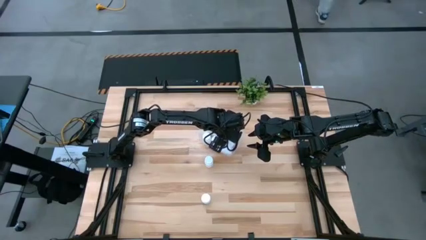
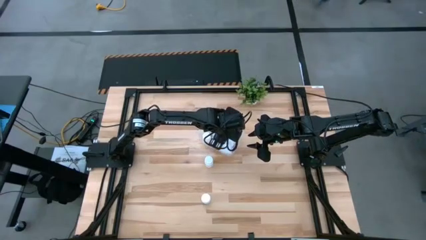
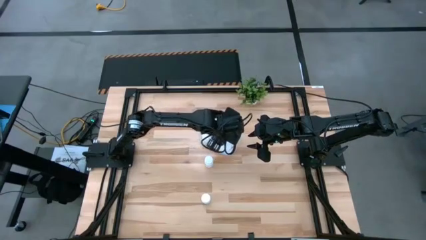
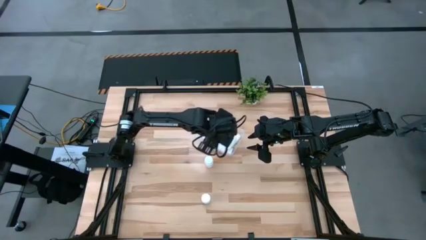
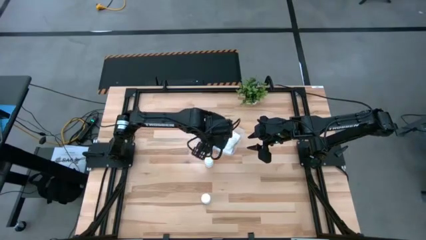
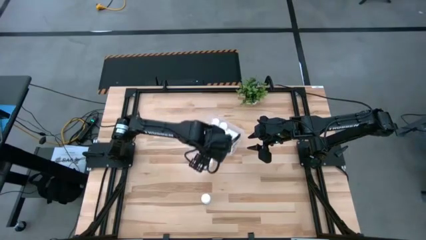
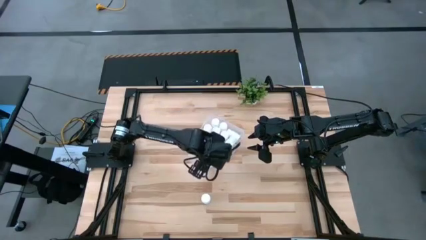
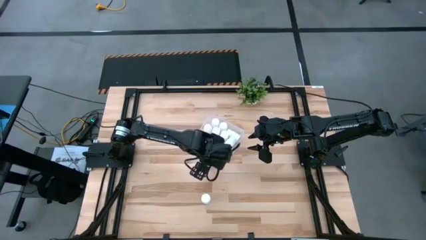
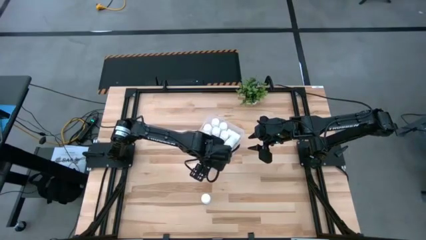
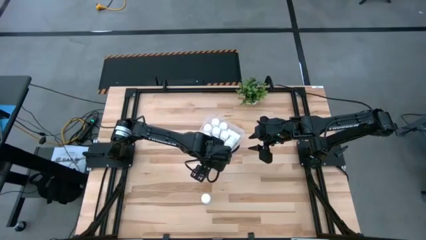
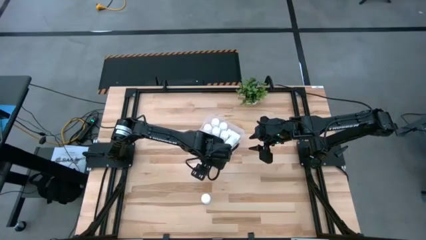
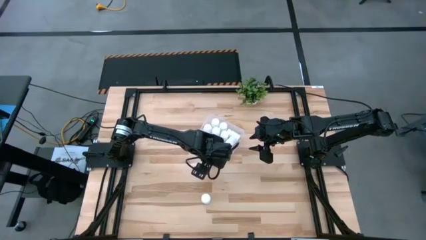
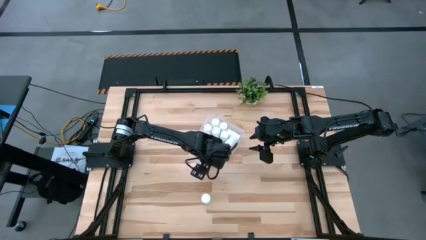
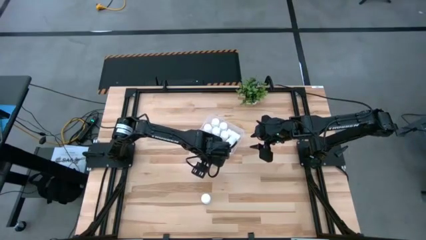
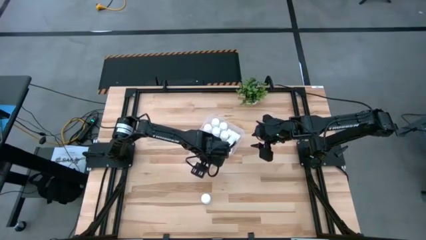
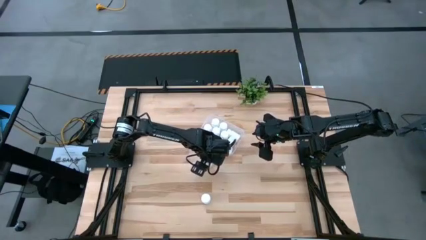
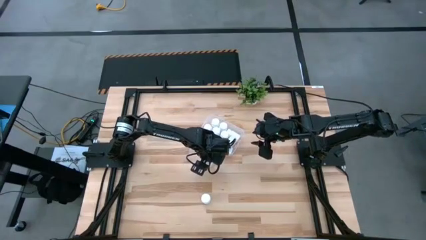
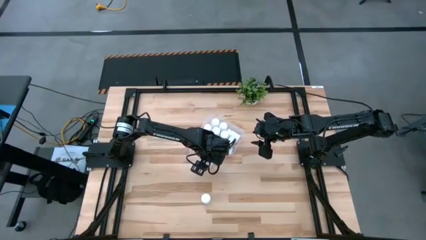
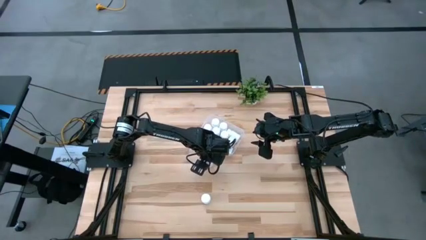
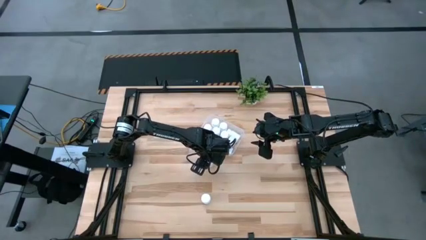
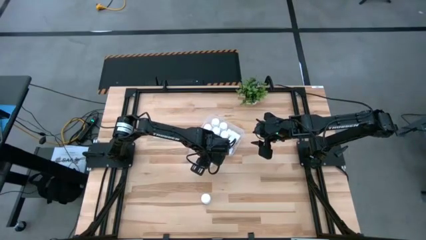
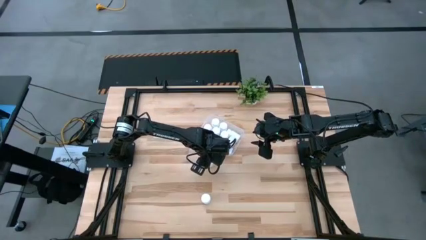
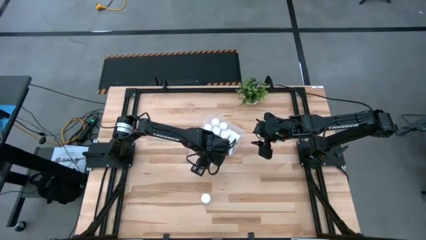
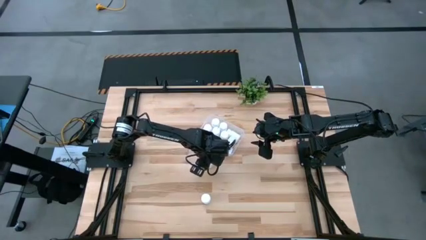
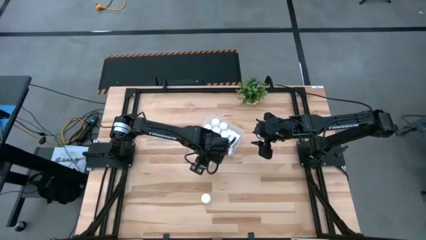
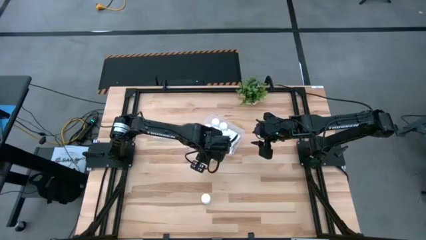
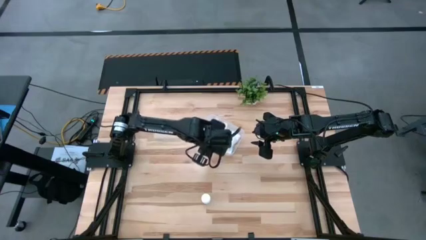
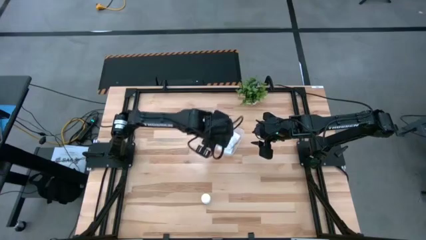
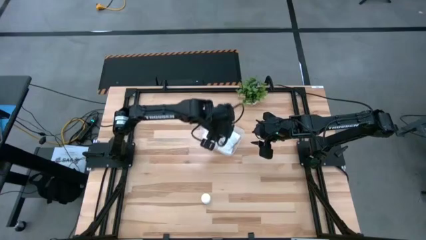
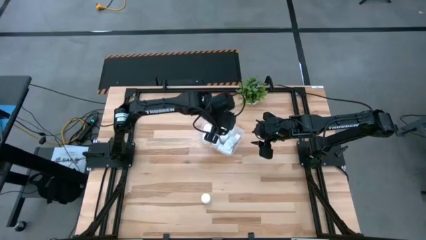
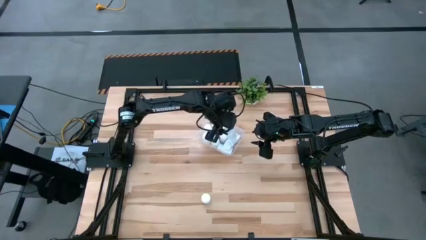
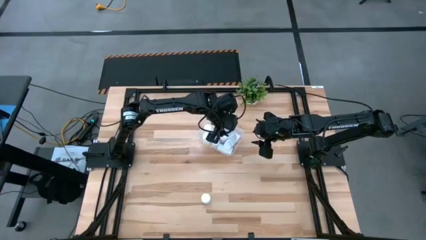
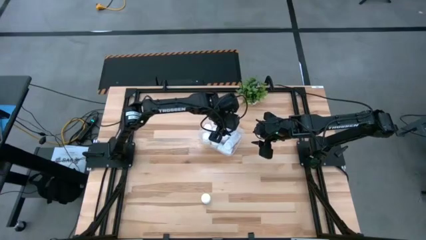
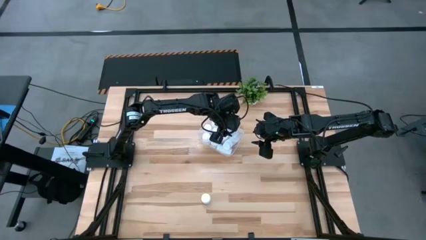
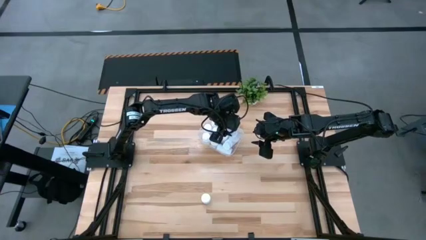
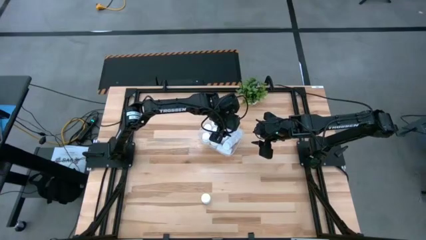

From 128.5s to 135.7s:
Task: Pick and place pill bottles into a basket
Put the top white pill bottle into the bin

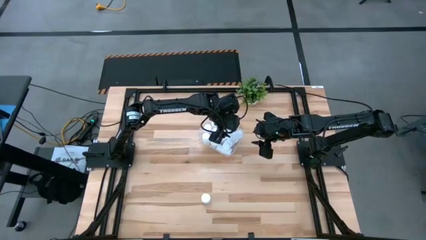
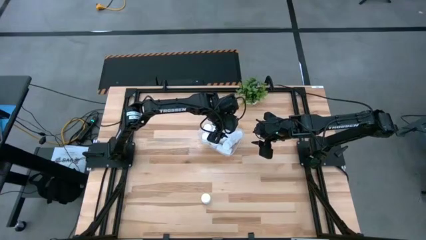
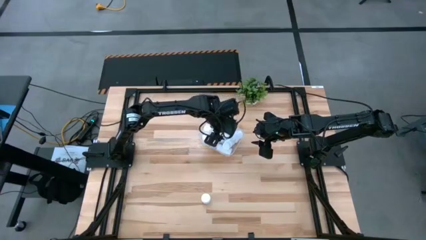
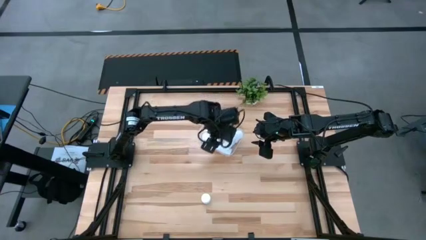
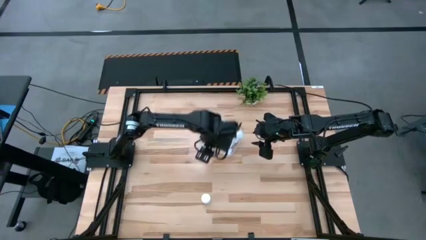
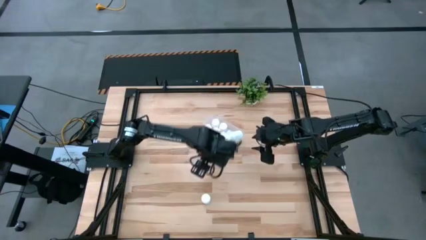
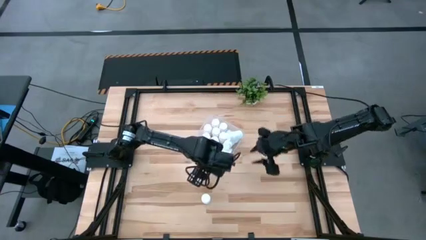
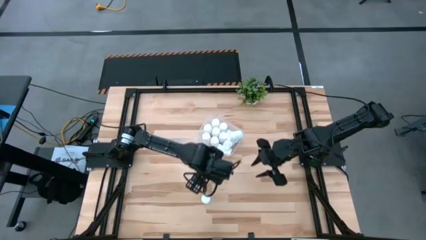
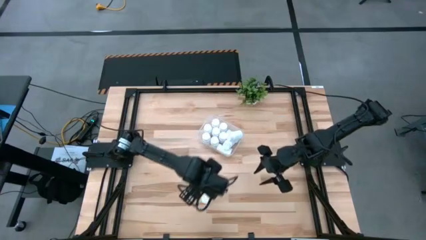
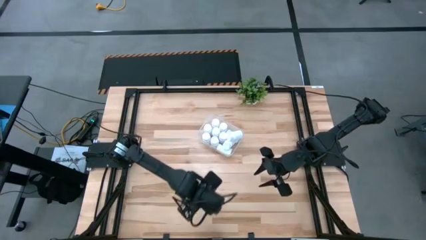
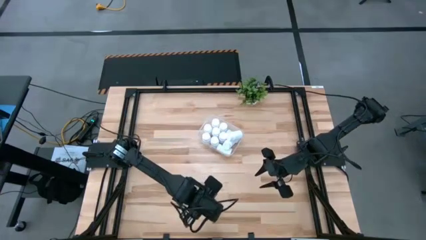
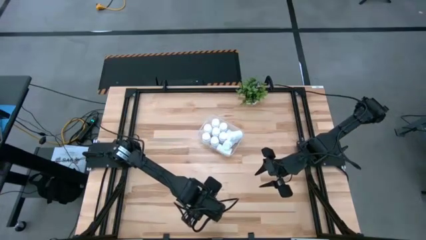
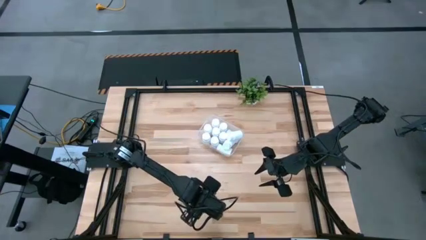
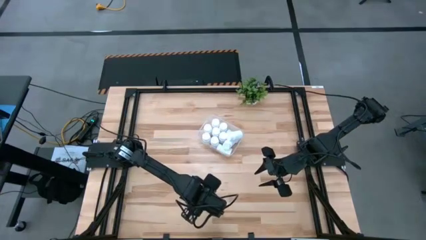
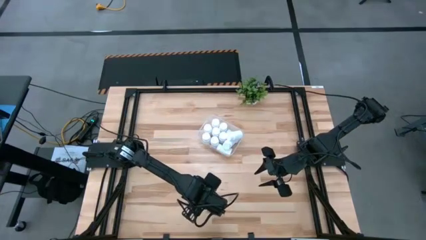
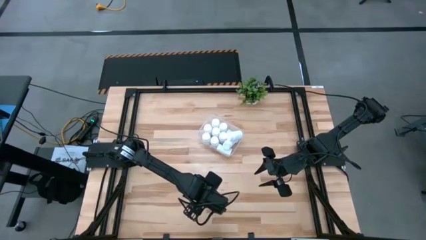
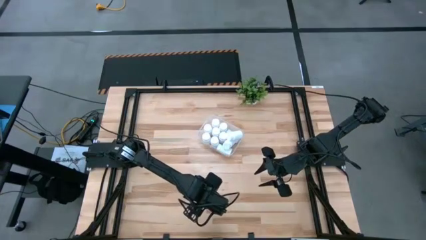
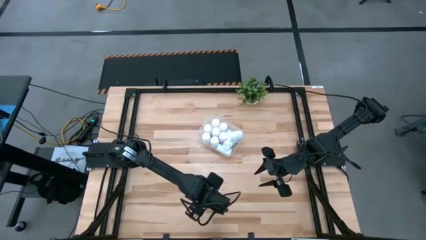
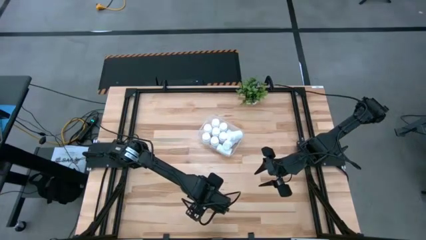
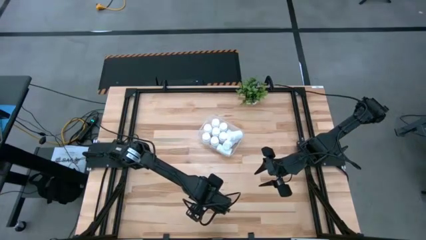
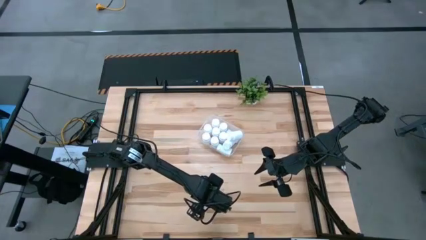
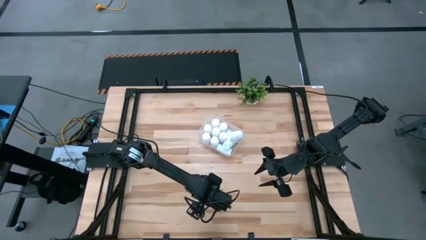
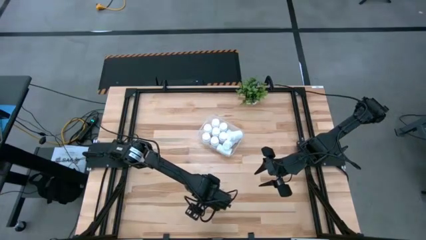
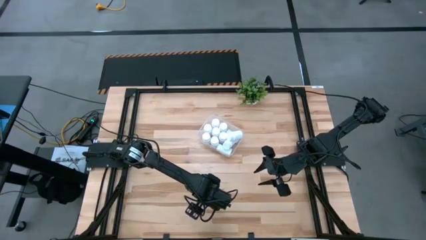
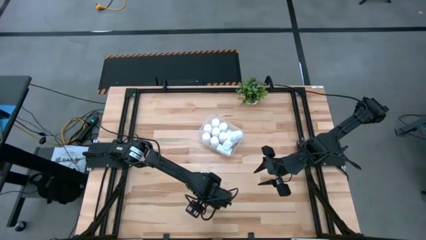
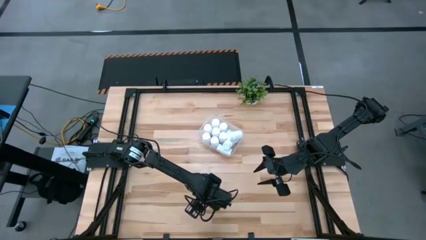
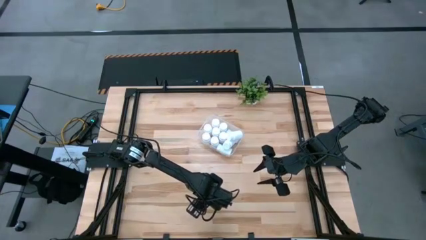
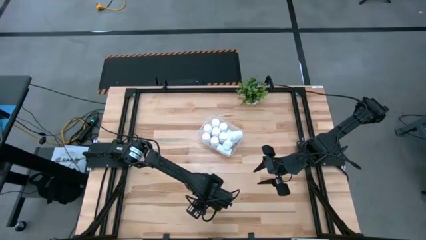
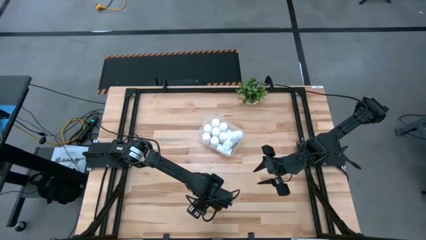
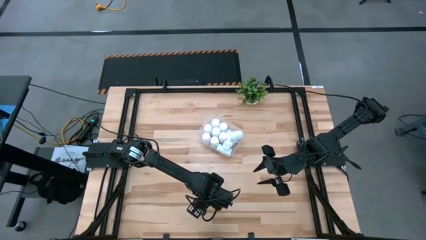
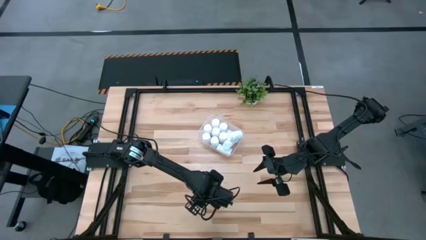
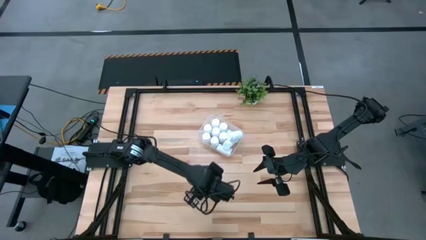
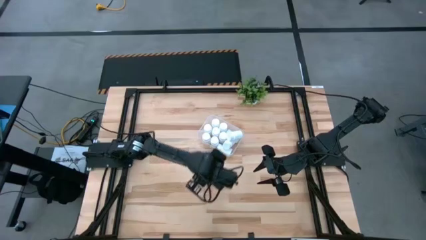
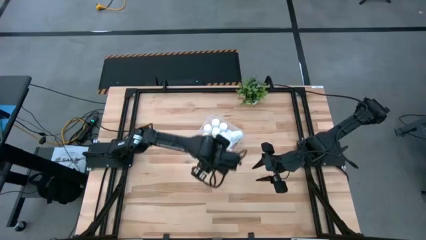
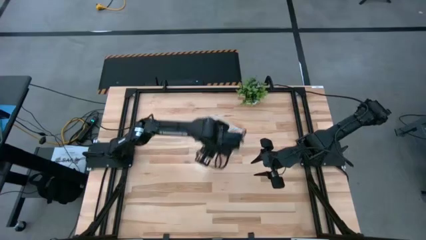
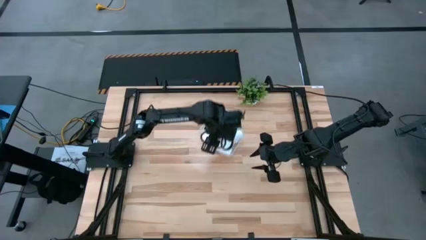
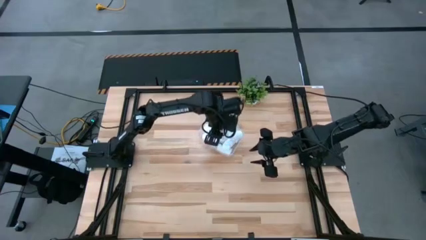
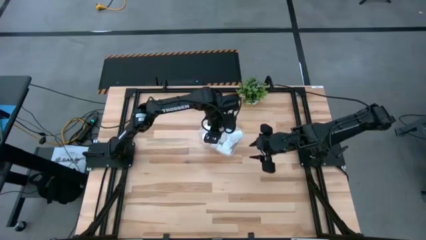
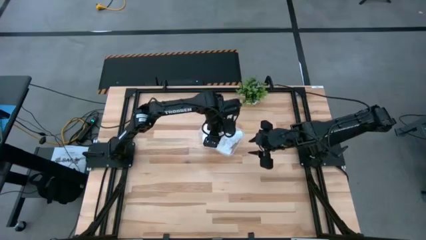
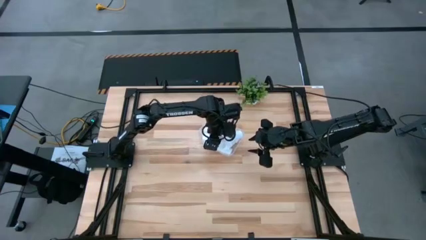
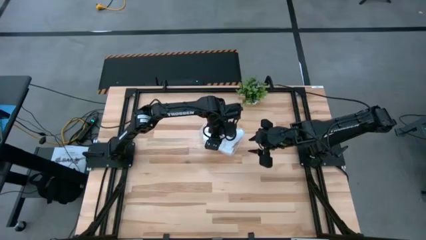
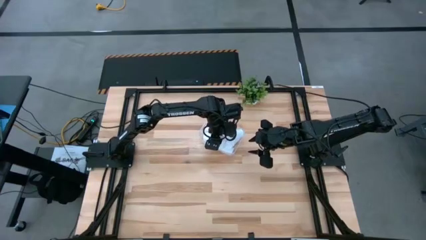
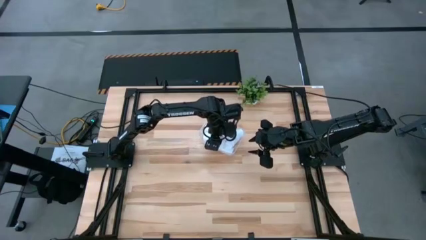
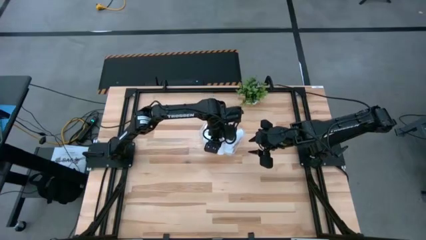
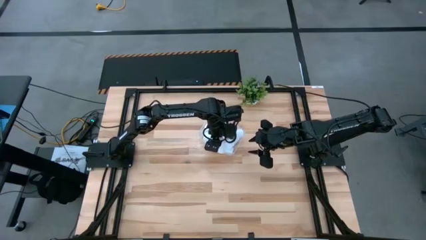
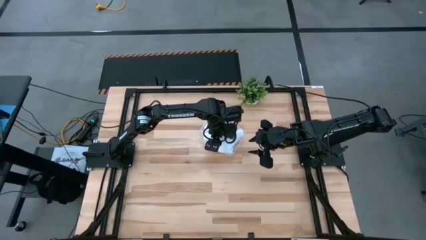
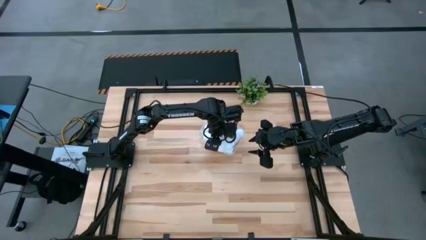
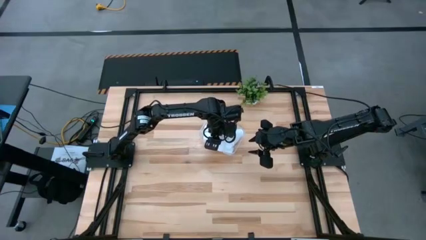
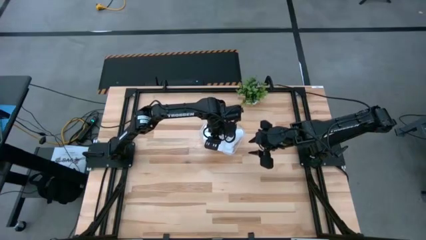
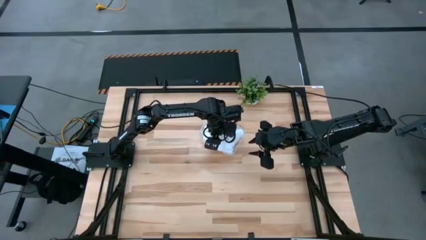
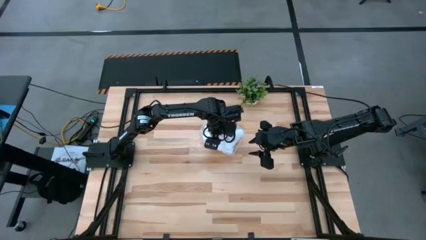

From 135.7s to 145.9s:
Put the pill bottle into the bin
